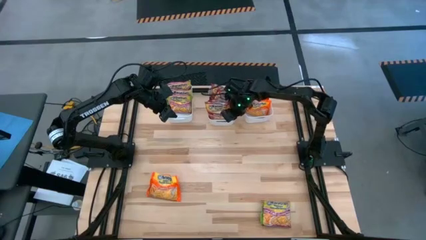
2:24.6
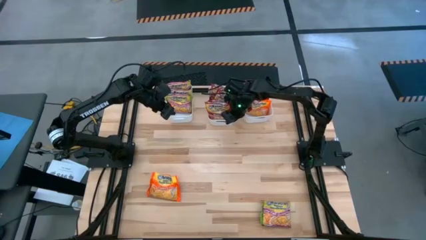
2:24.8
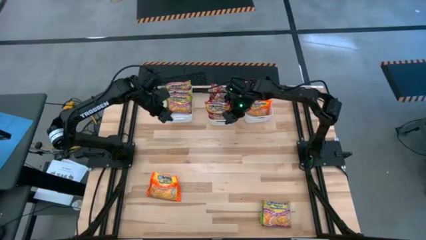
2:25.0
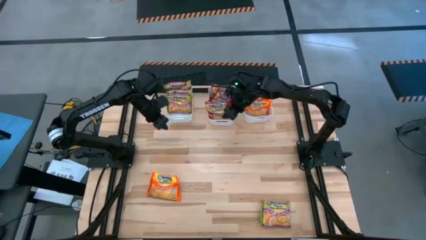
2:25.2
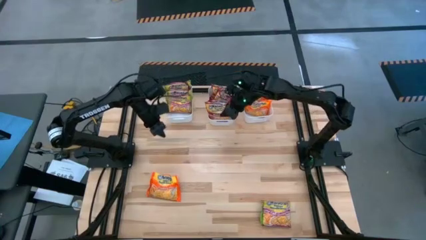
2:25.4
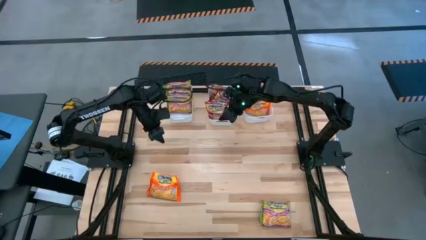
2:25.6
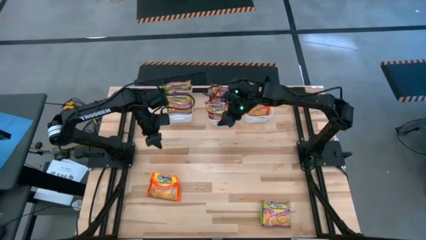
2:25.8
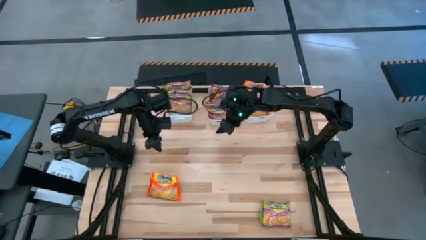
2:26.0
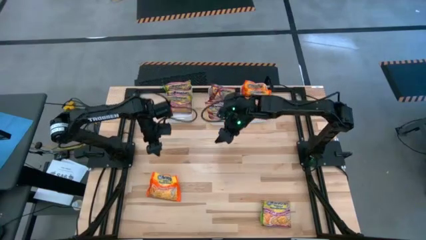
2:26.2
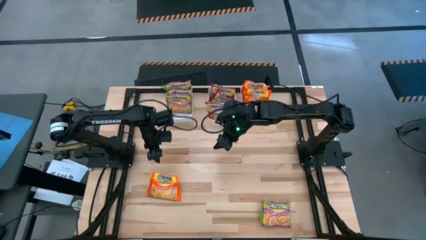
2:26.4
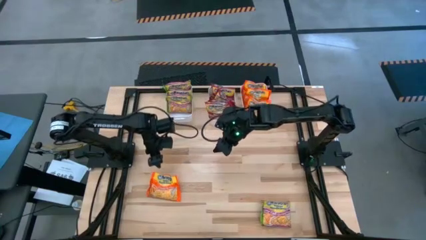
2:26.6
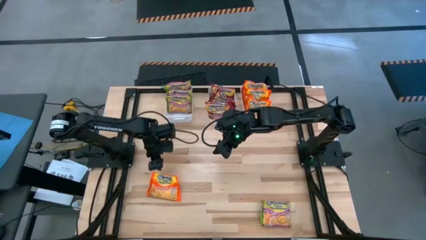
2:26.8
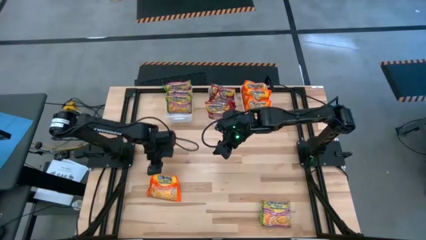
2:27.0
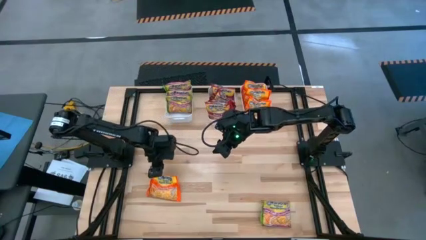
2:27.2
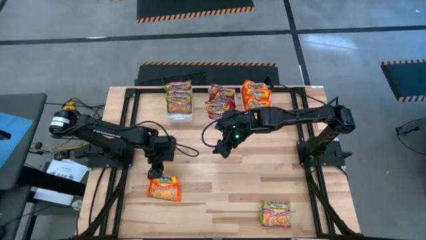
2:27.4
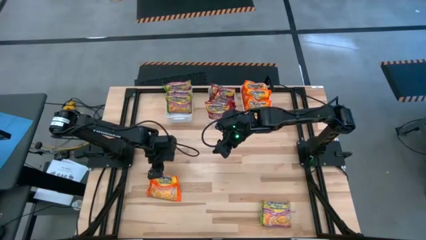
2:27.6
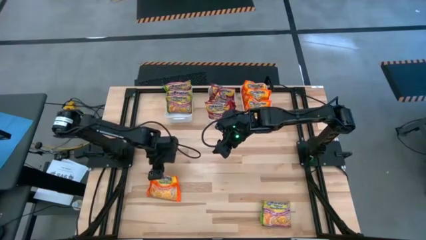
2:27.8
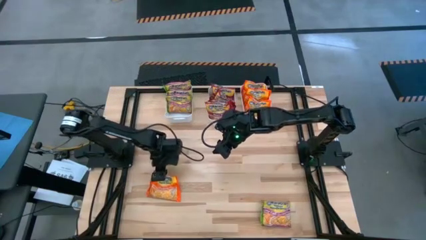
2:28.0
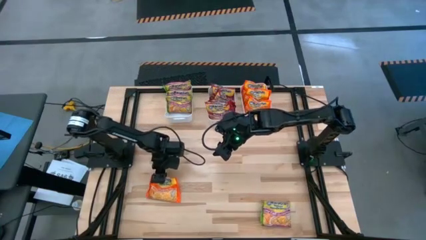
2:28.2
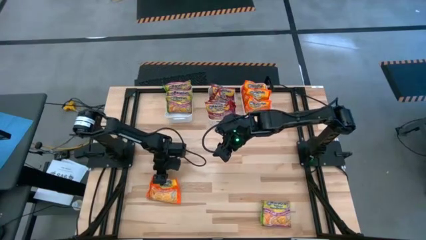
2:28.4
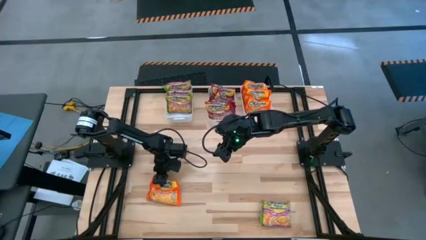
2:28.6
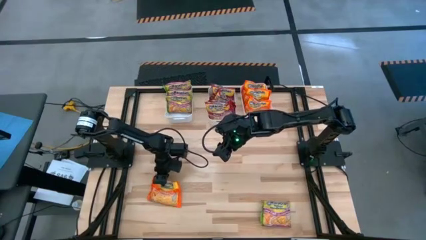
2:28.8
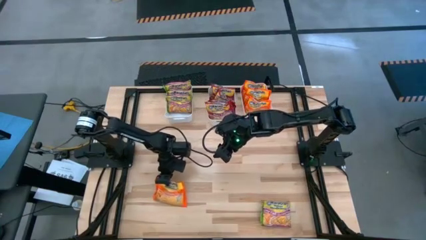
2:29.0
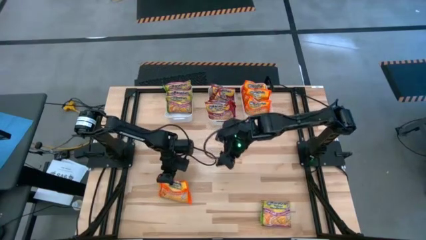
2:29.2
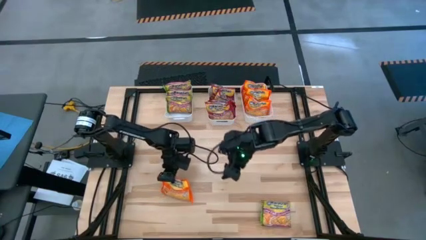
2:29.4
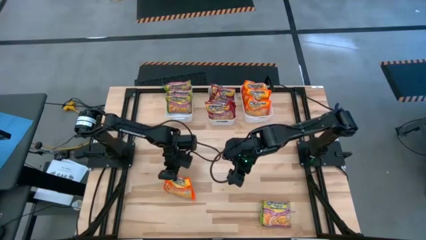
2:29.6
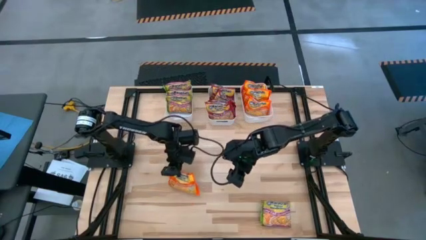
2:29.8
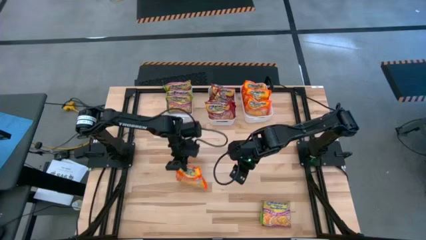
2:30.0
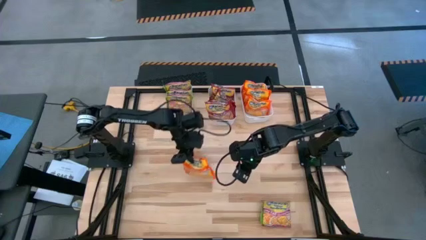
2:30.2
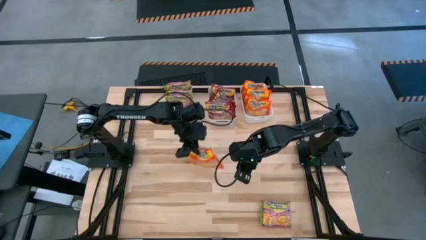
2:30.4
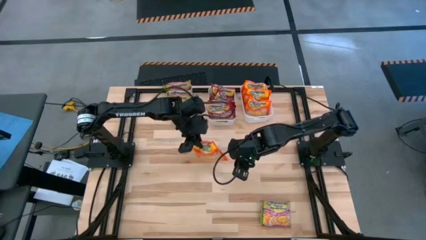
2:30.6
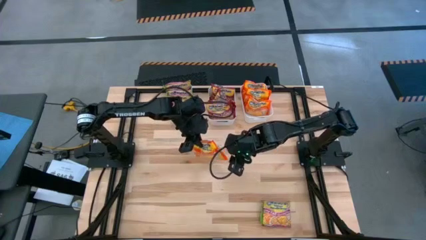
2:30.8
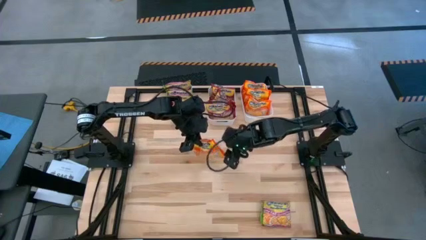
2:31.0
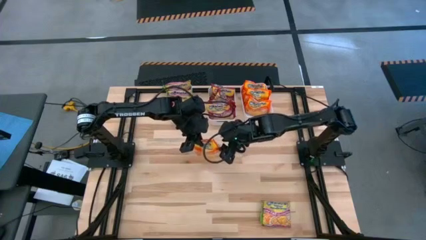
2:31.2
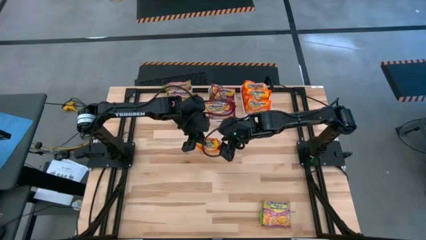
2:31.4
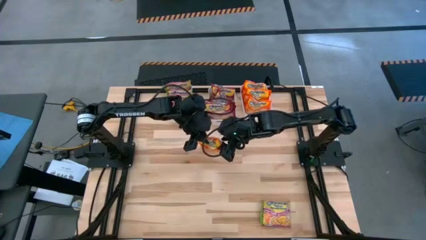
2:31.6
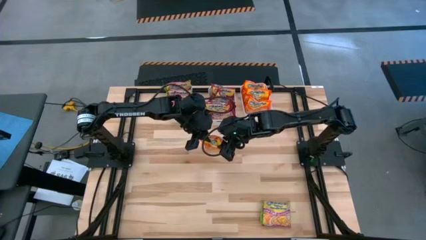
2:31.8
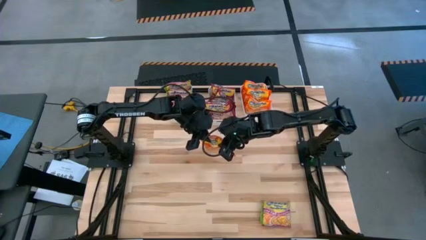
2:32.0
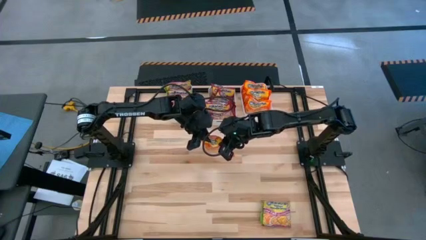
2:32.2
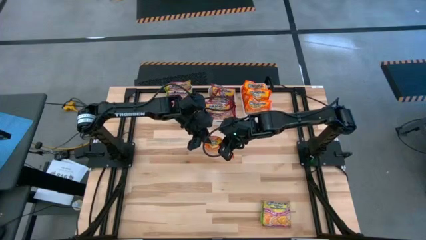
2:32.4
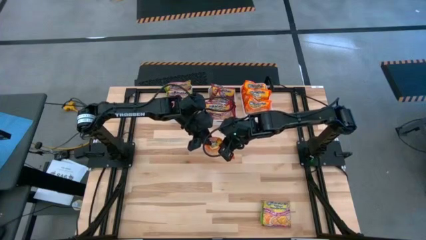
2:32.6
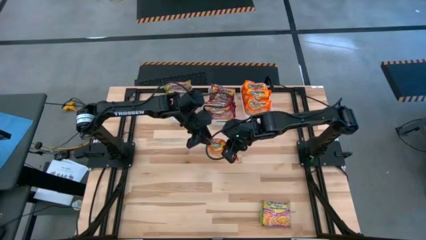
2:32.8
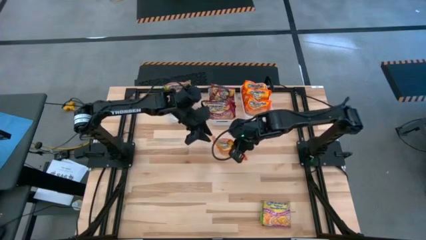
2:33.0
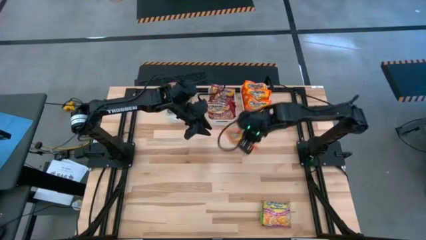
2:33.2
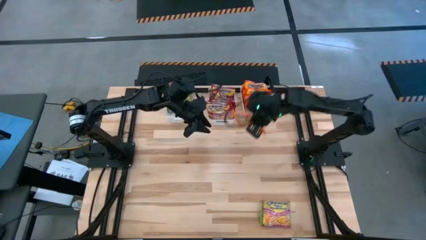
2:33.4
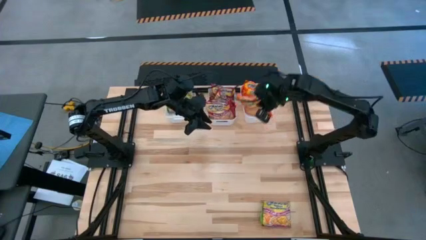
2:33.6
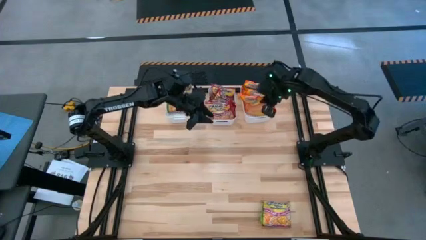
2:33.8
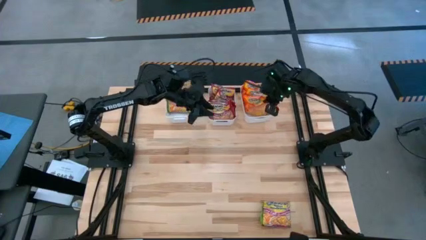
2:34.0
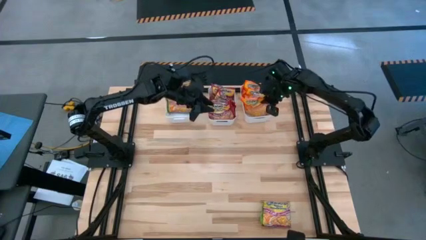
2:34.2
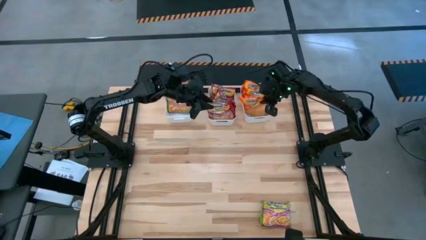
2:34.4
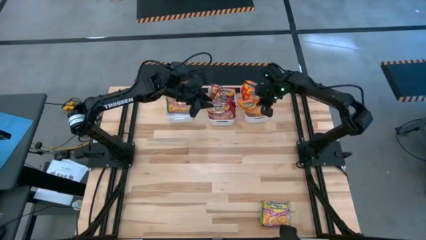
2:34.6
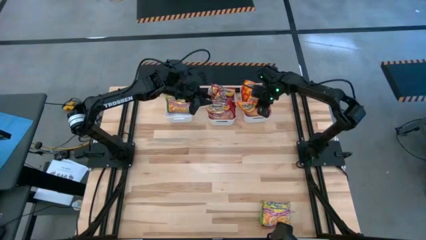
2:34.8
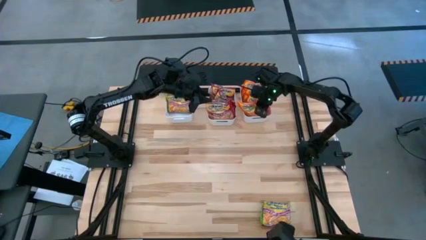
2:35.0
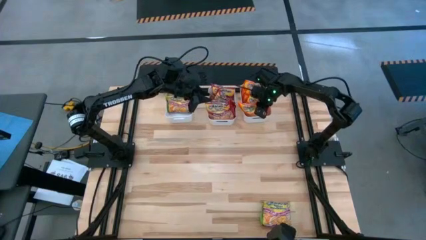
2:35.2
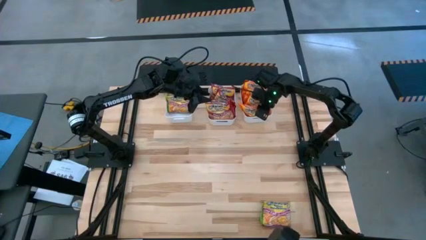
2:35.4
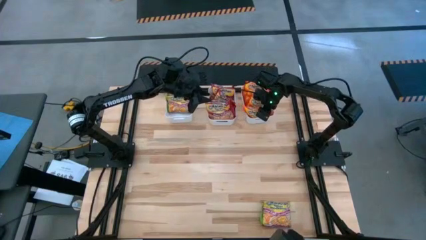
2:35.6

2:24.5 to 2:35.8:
Task: Sort Maruchan noodles
Put the orange noodle pack into the right white bin

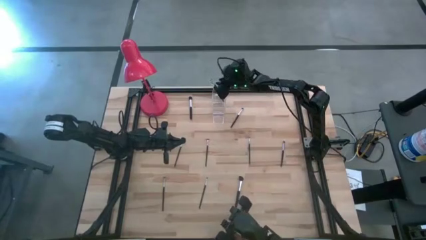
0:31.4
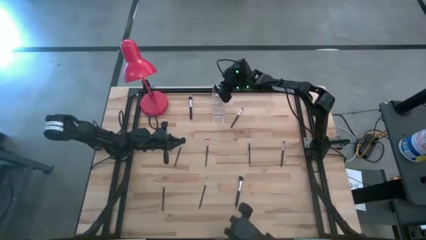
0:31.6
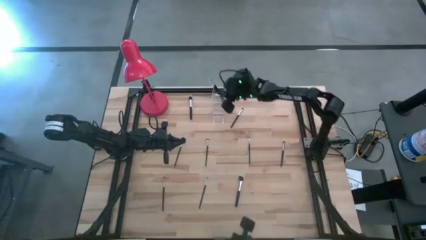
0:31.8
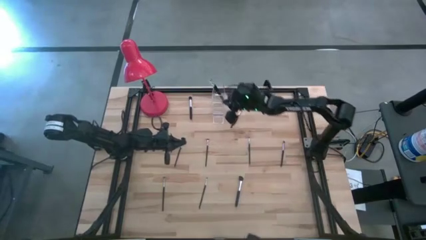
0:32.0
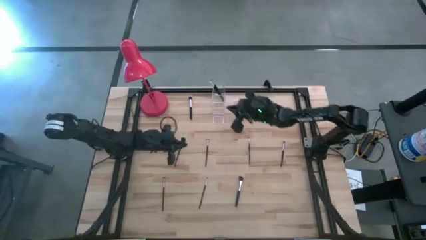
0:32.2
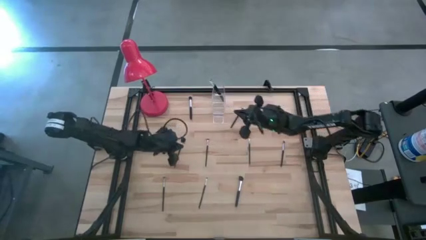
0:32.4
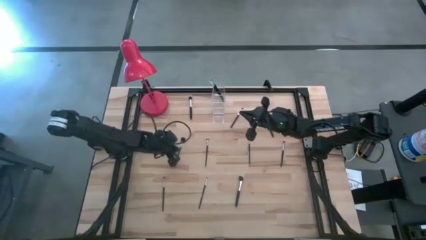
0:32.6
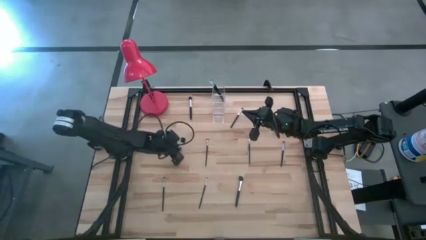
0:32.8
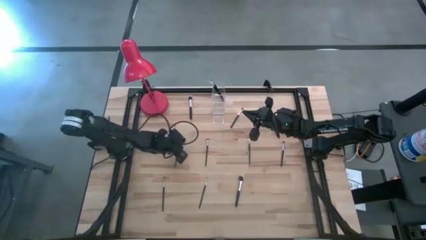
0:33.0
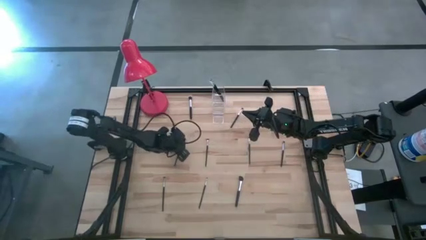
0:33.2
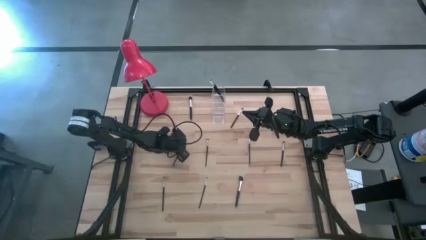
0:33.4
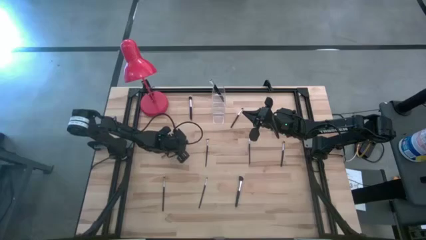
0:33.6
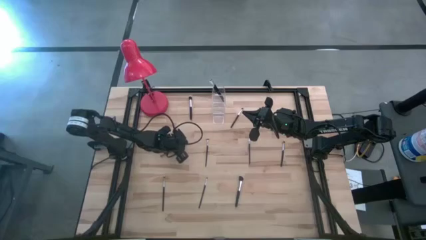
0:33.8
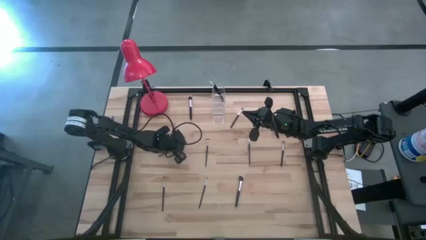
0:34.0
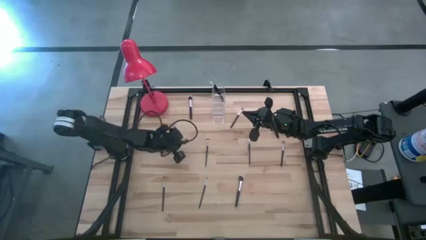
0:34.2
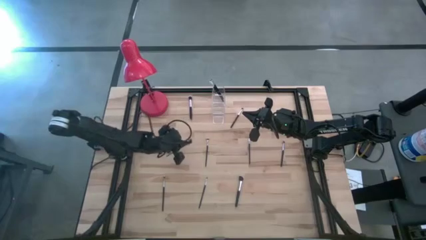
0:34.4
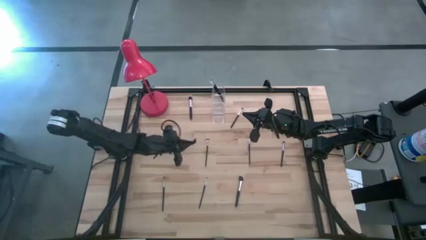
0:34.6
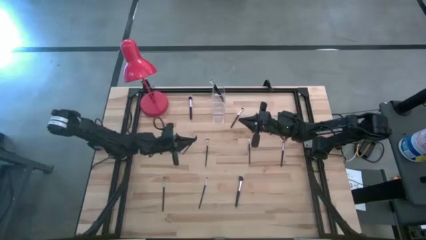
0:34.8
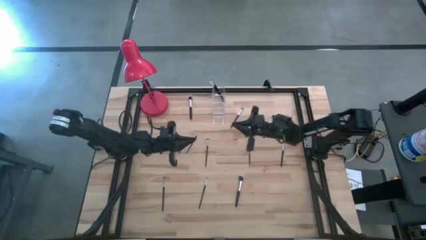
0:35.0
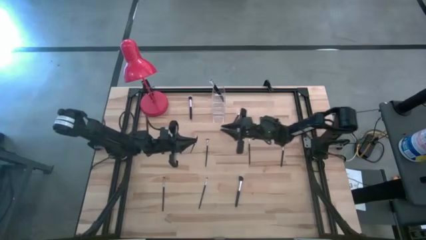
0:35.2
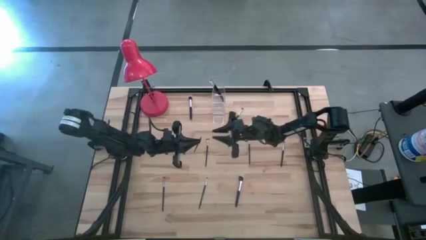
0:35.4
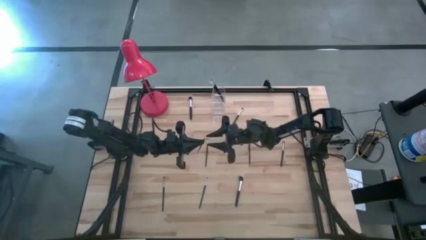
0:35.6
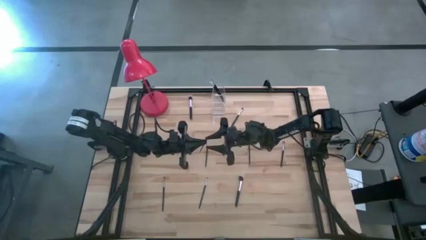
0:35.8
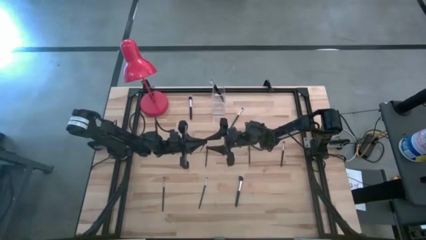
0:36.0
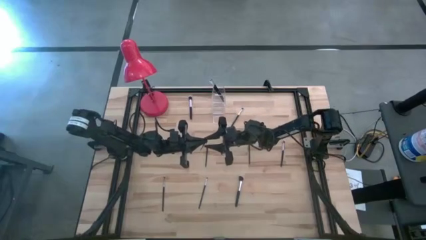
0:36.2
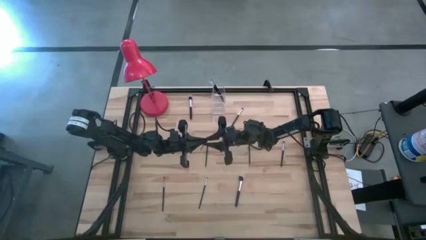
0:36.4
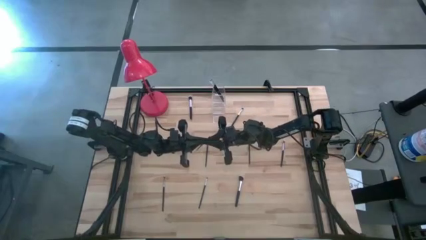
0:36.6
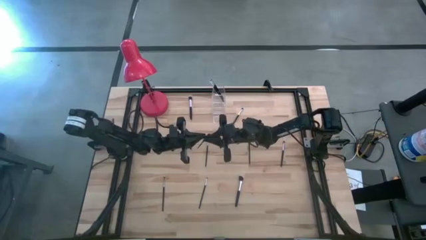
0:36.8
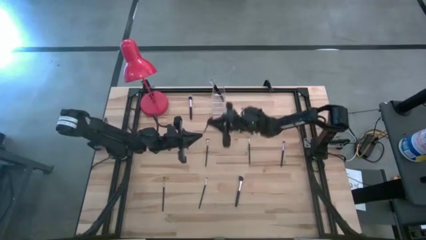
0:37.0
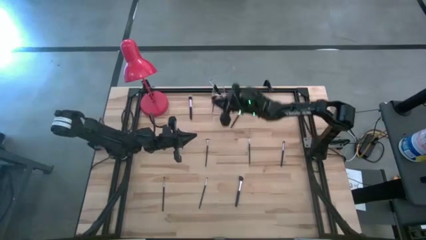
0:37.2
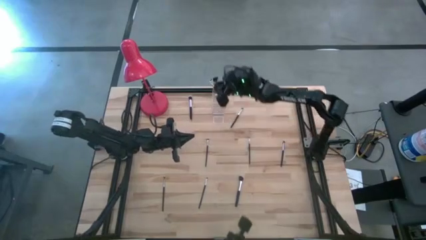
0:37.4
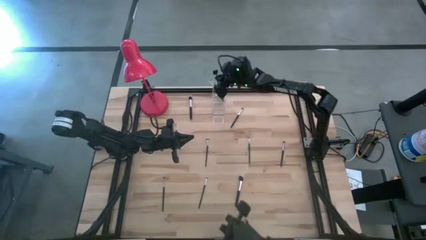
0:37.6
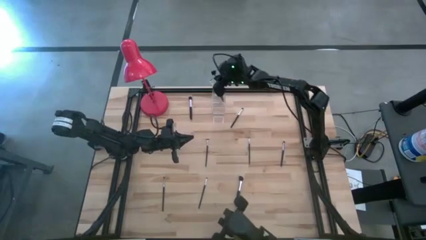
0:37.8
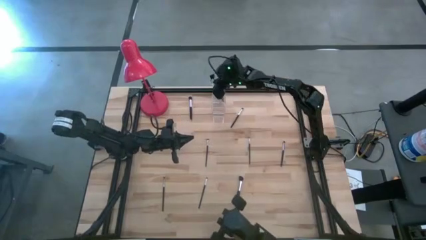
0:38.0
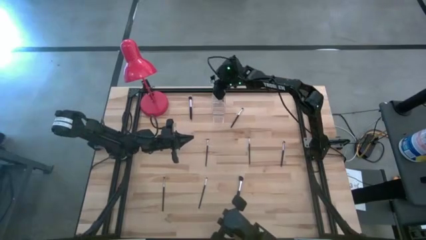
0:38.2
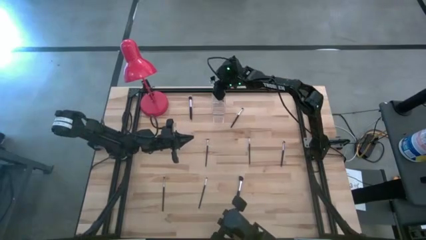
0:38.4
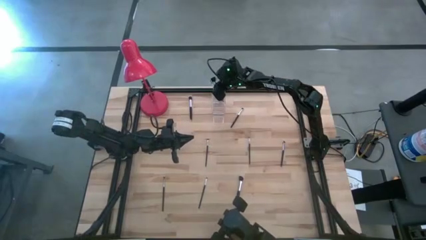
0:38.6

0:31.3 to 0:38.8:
Task: Put items in baskets/containers
Put the black lash brush into the transparent organizer
